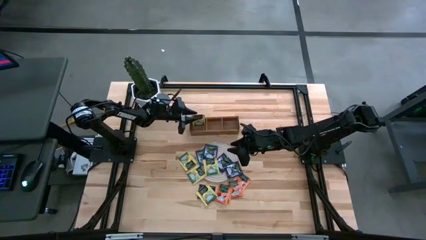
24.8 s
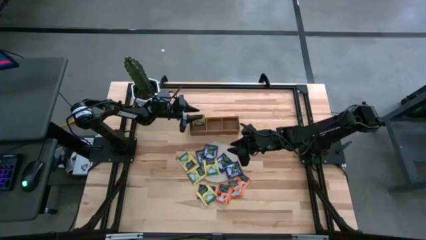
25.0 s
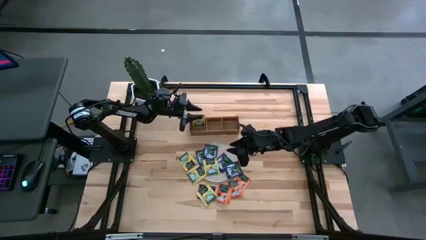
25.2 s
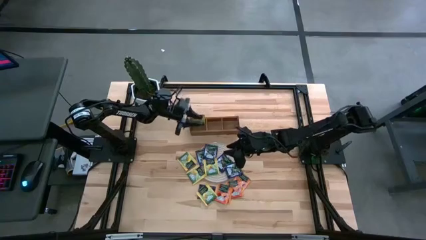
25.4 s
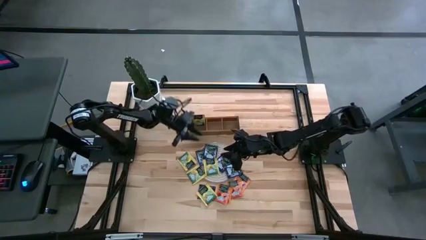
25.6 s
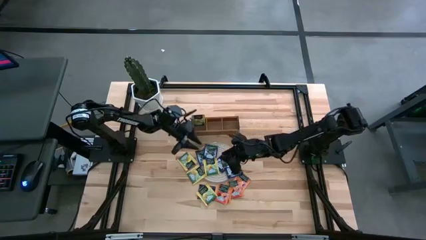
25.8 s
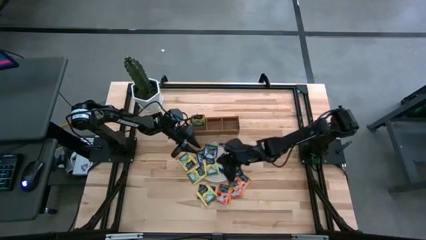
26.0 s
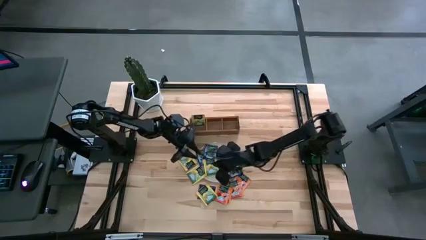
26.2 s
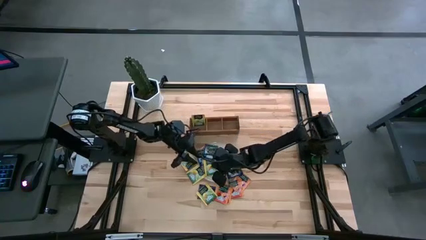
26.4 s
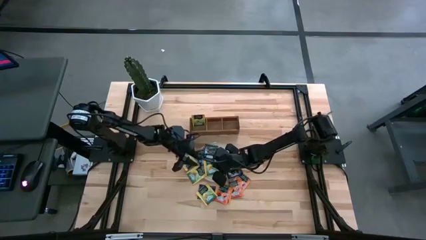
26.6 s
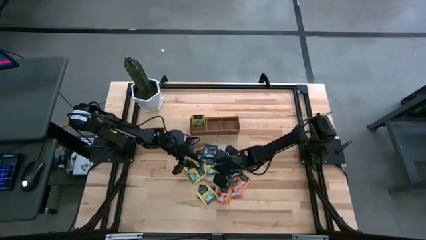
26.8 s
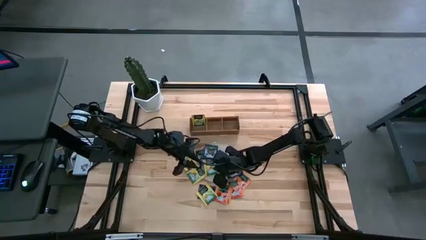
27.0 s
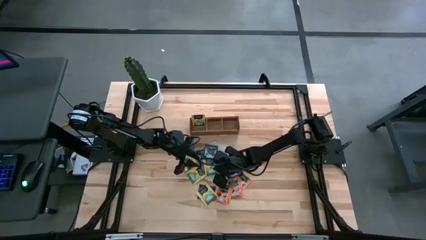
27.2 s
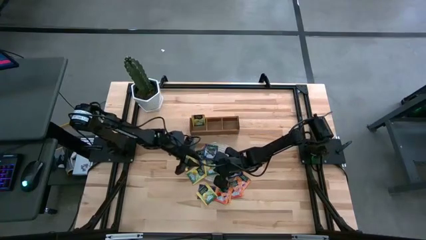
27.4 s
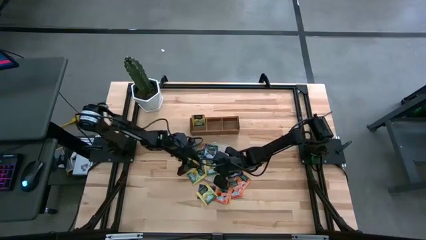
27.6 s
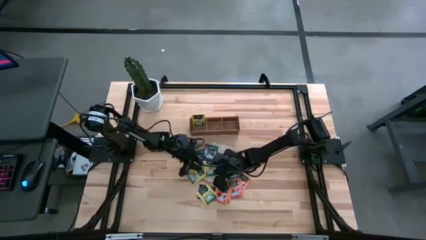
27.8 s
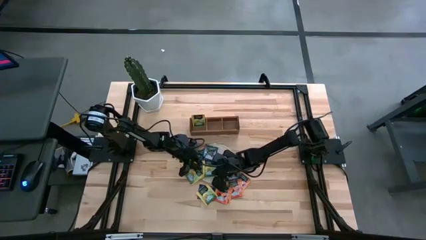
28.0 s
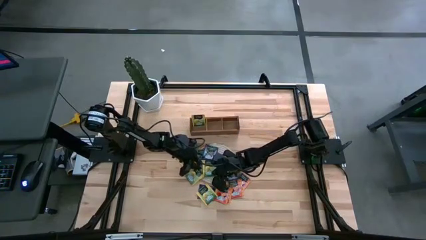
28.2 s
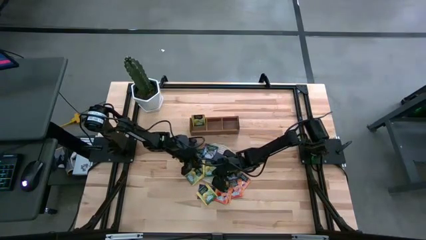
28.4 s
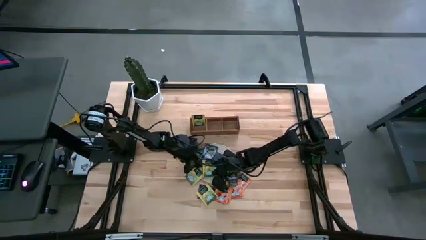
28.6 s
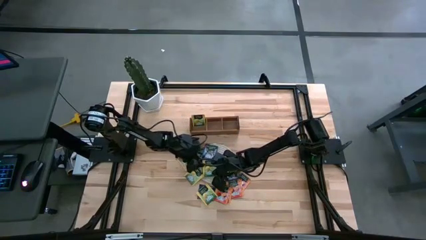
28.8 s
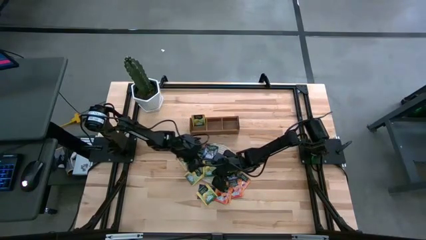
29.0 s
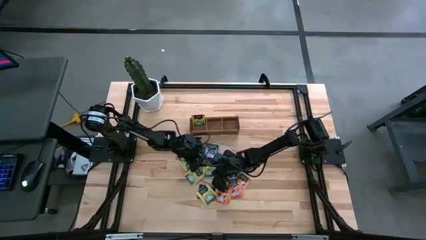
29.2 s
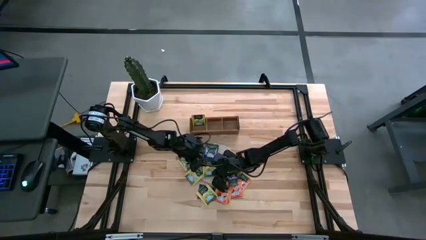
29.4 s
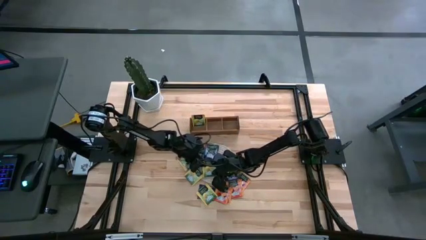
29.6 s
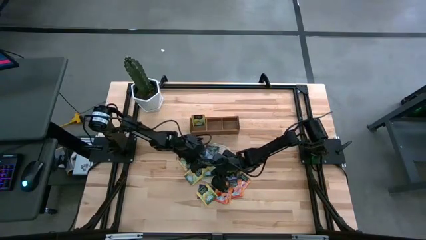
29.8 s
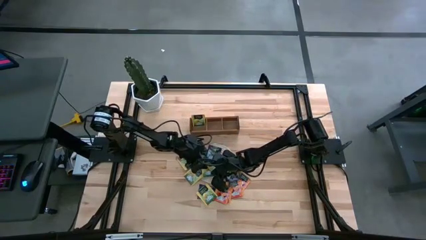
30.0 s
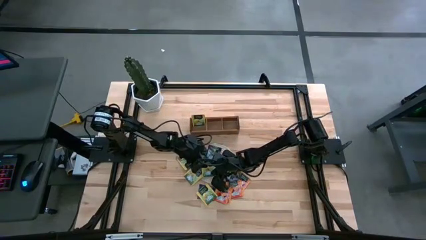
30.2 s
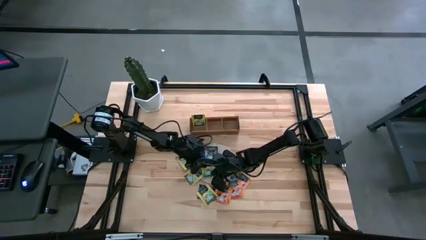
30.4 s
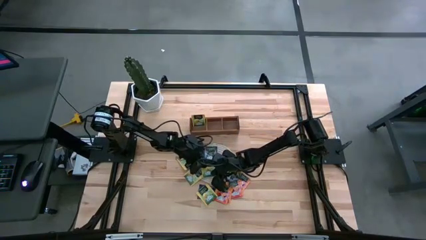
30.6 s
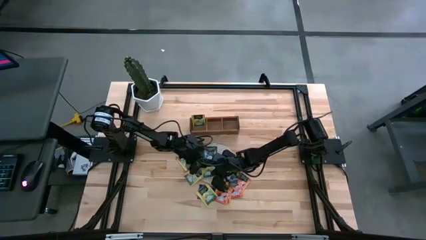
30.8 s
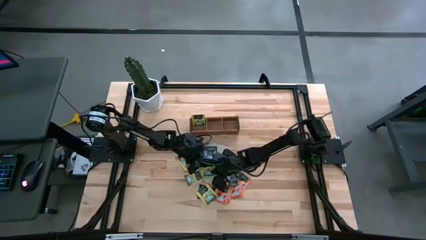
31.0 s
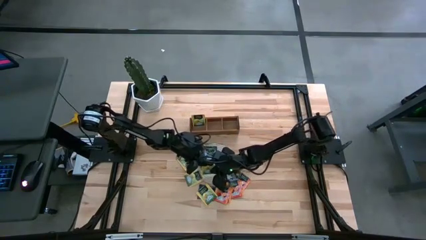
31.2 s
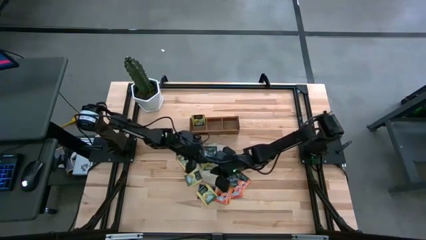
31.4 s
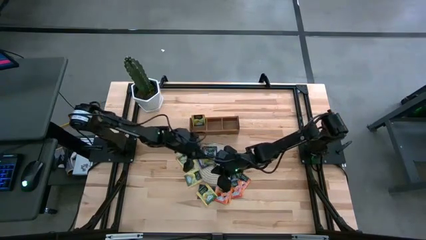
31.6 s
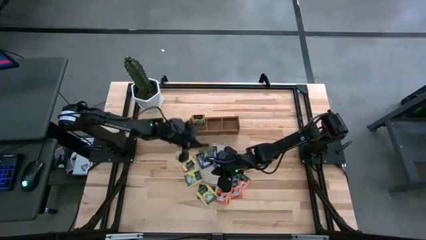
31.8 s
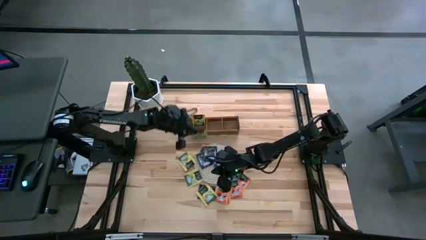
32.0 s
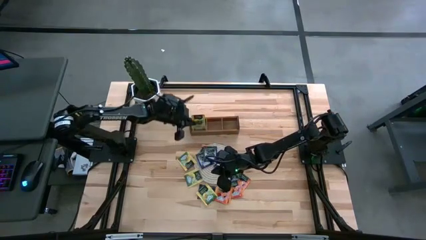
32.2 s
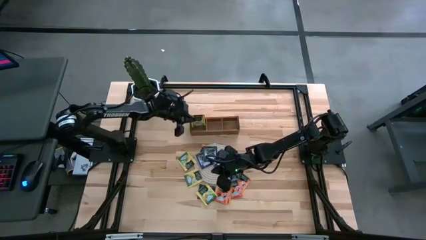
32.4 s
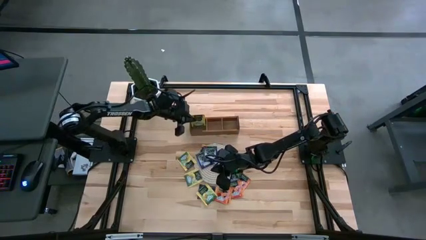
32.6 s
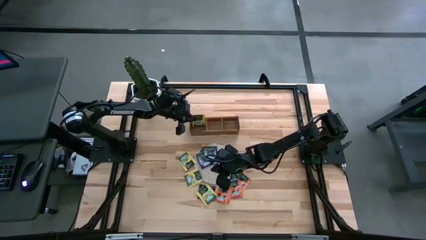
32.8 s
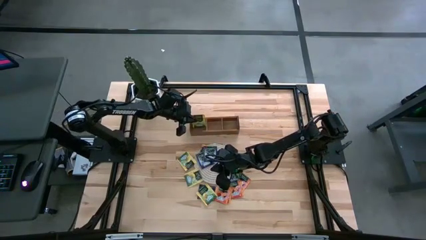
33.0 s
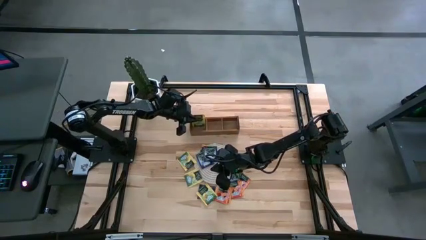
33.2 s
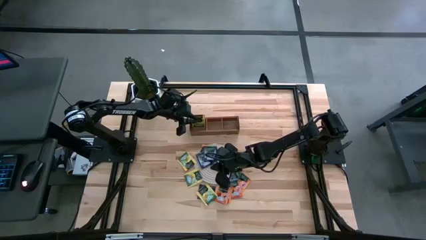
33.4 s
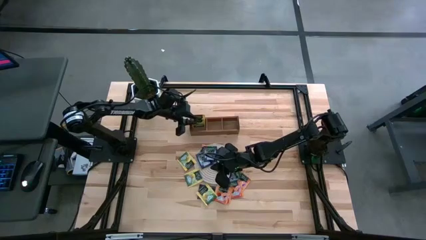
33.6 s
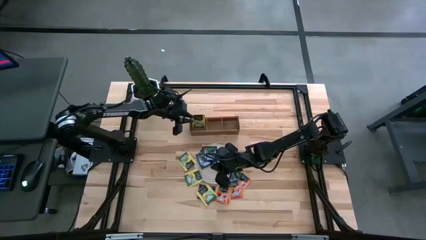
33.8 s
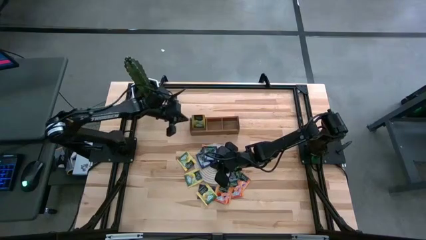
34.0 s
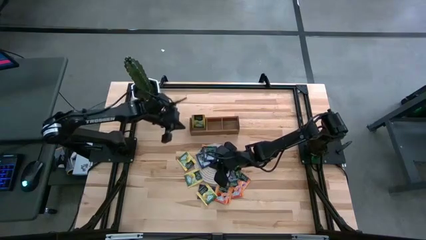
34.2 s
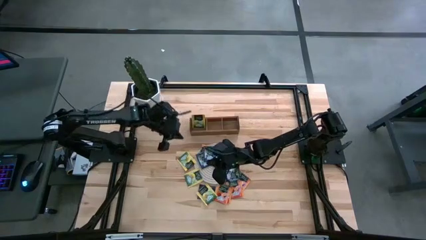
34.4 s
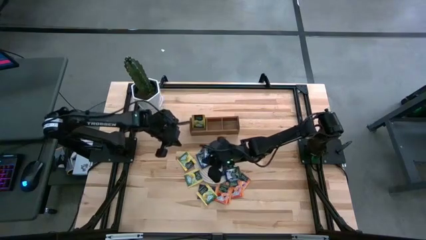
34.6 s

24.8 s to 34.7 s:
Task: Pick & Place Tea
Put the yellow tea bag into the left section of the wooden organizer

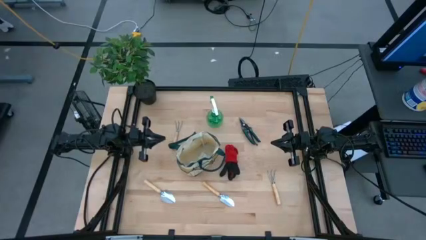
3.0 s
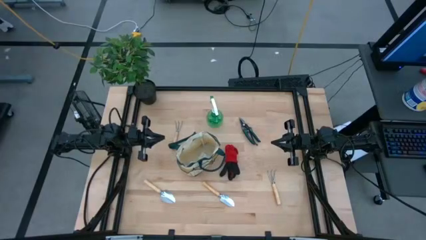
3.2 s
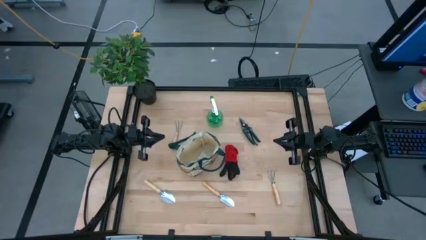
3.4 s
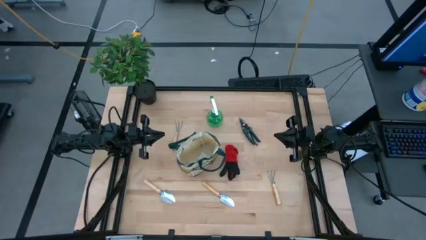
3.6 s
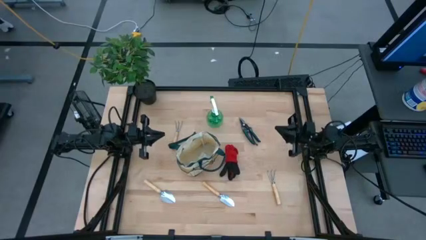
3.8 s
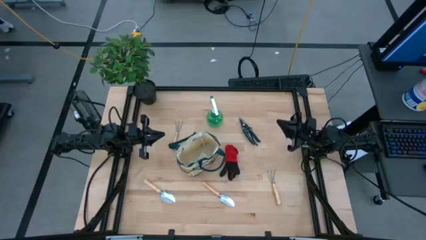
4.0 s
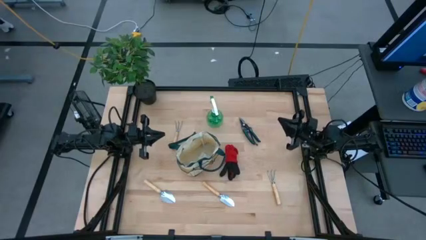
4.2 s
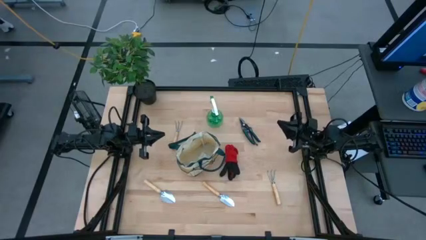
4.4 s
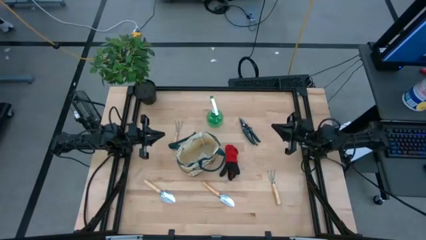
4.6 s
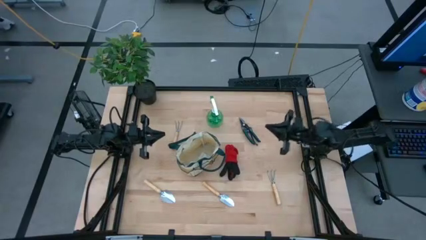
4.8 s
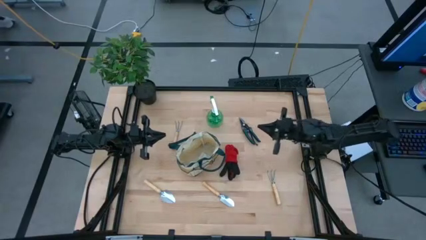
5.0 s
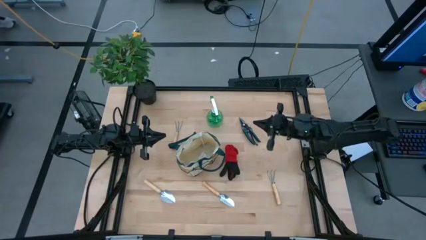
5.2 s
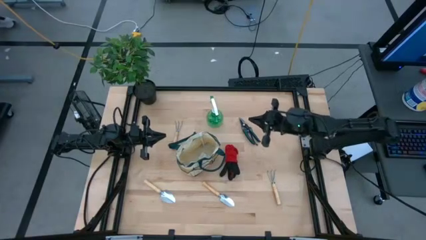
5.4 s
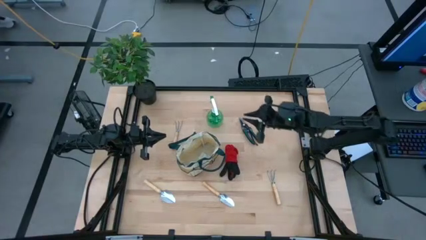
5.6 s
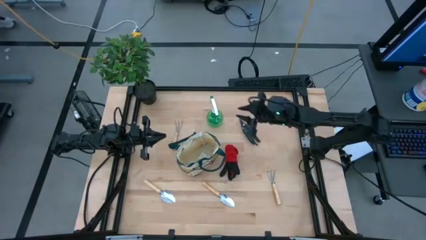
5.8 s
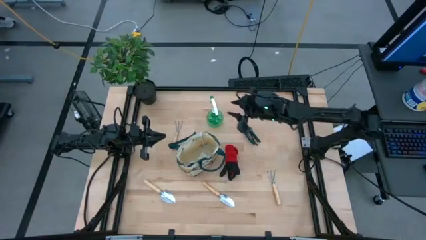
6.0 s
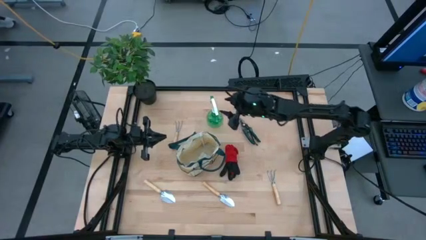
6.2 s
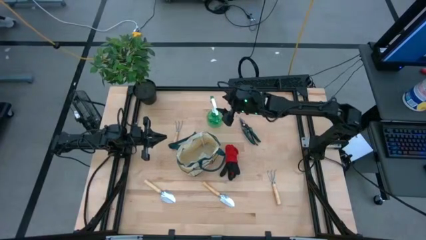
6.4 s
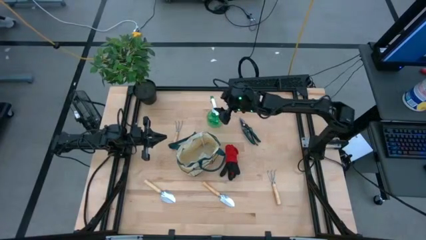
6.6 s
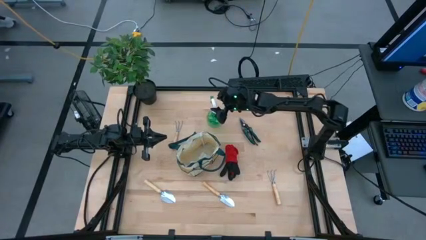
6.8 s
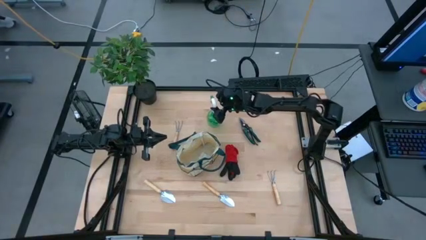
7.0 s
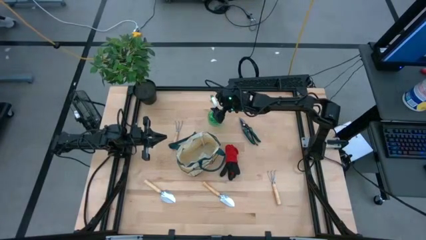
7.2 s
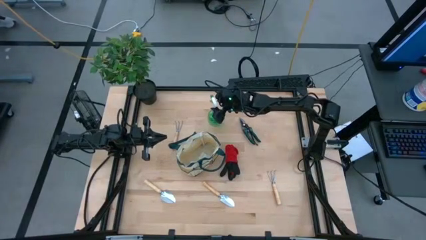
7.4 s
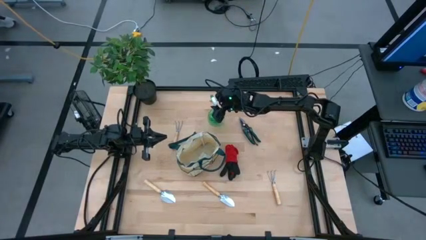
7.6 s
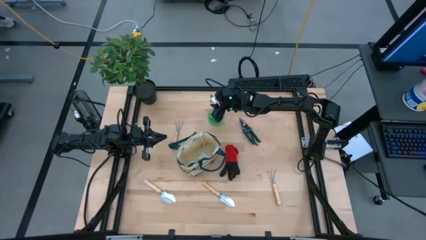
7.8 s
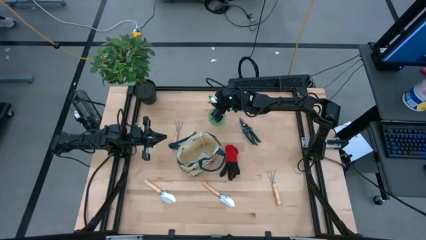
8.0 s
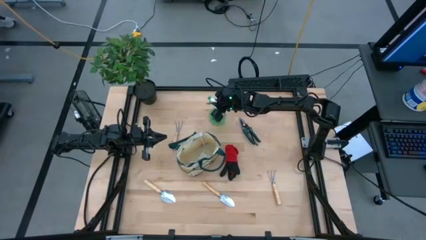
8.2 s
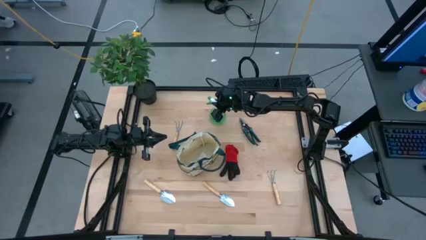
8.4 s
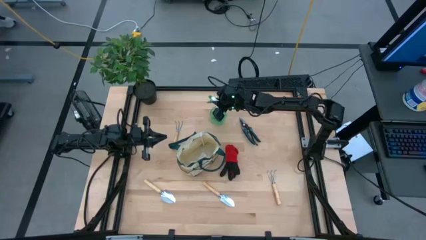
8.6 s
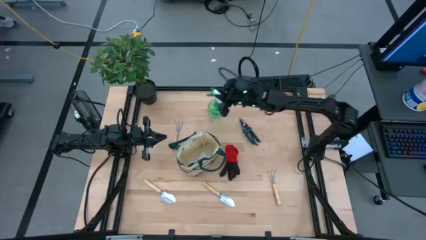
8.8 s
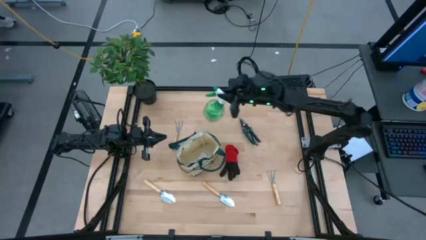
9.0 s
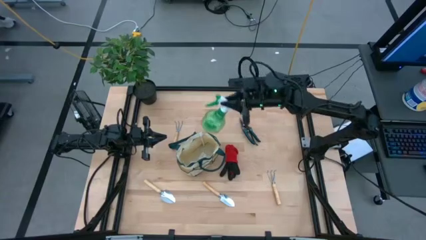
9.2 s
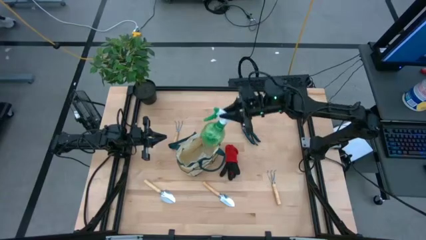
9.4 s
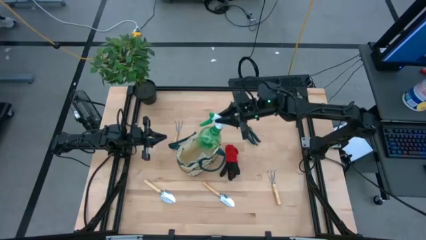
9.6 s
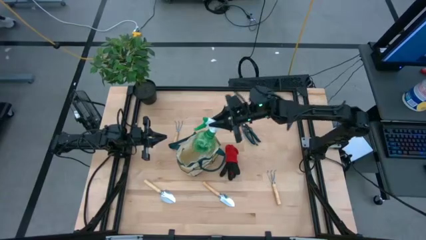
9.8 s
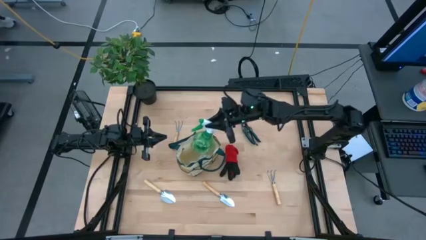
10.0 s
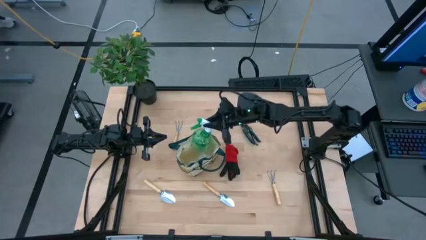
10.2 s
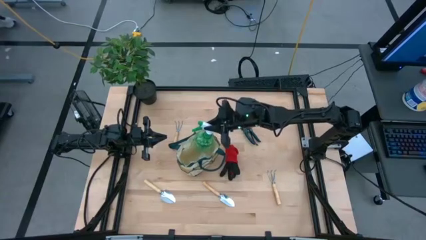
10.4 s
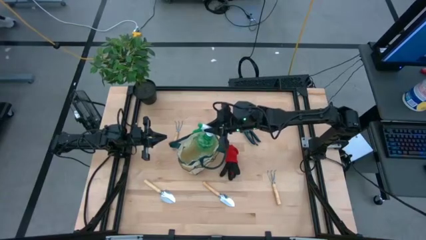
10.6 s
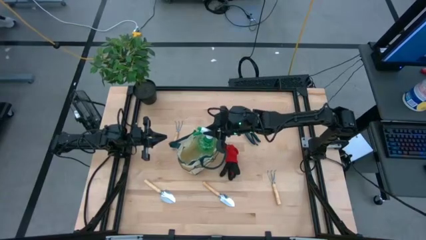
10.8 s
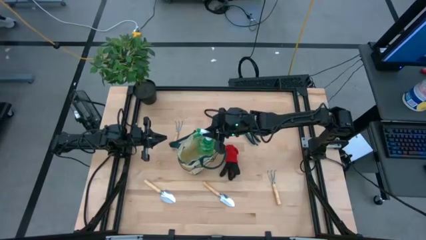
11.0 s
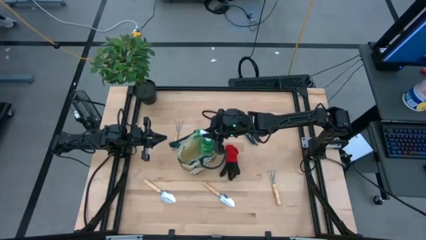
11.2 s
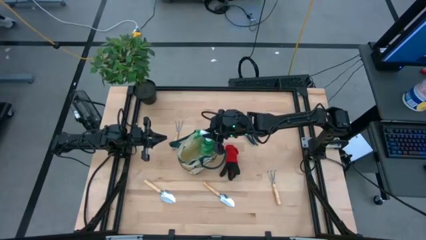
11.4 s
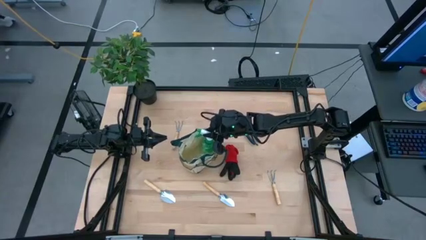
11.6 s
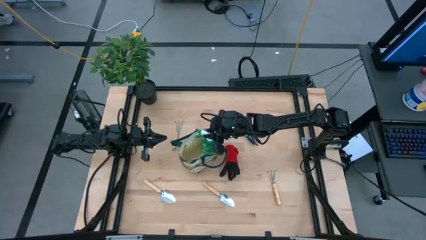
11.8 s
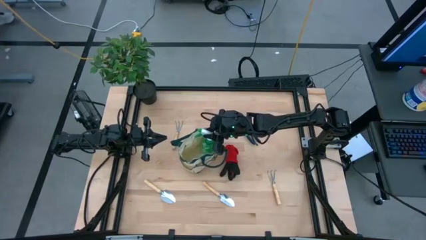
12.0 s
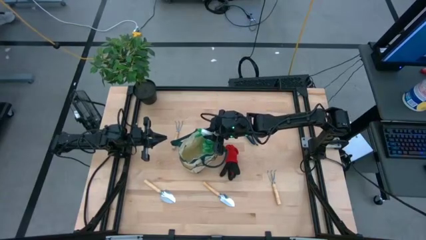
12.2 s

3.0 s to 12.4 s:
Task: Pick & Place Garden tools in Gardening bag
Put the green spray bottle into the gardening bag
